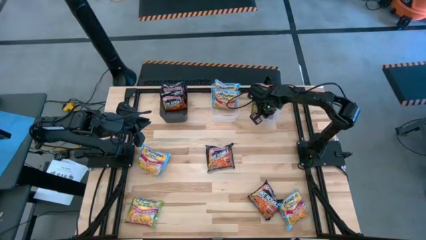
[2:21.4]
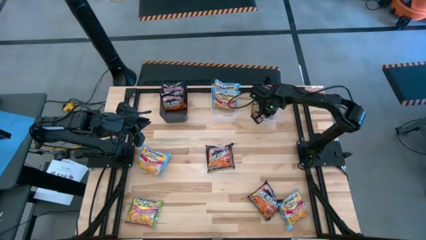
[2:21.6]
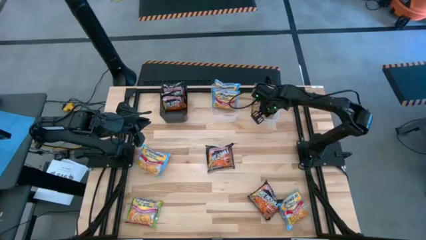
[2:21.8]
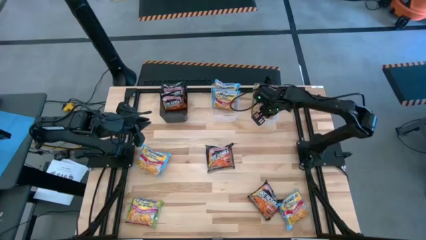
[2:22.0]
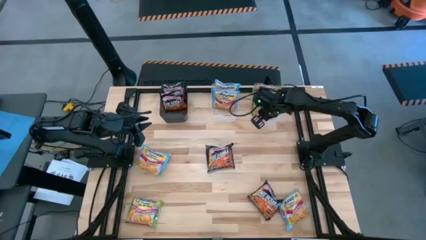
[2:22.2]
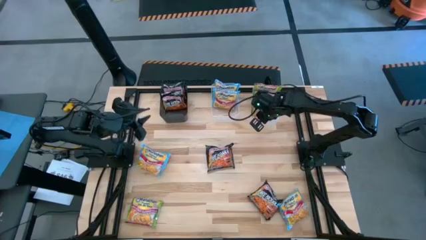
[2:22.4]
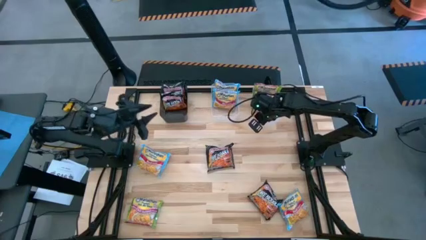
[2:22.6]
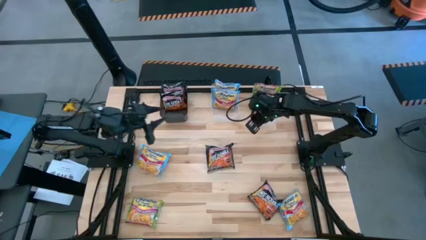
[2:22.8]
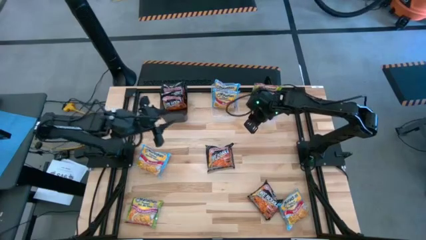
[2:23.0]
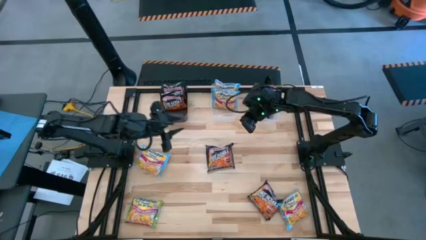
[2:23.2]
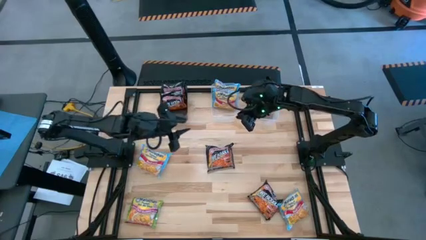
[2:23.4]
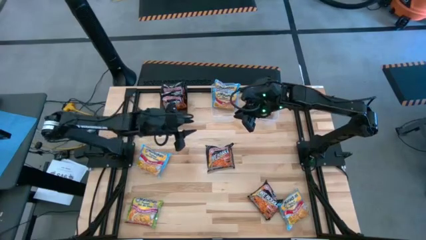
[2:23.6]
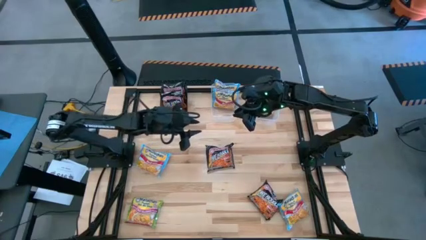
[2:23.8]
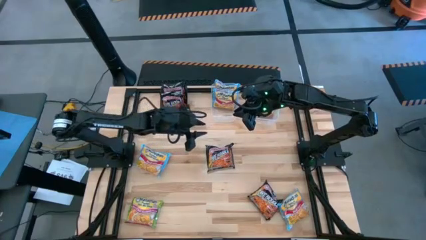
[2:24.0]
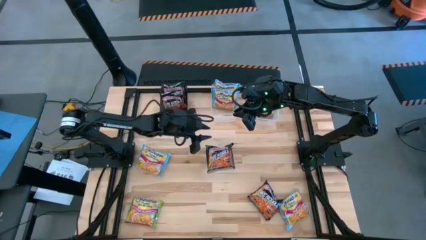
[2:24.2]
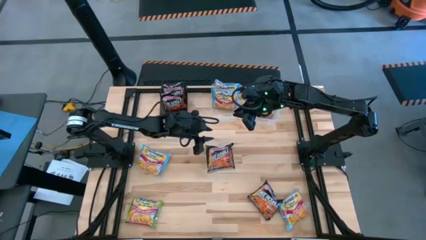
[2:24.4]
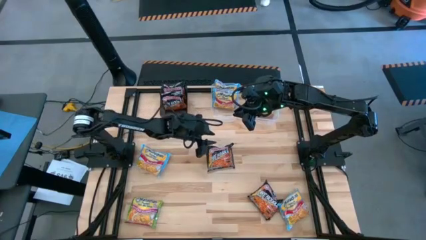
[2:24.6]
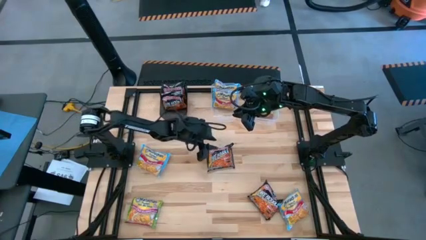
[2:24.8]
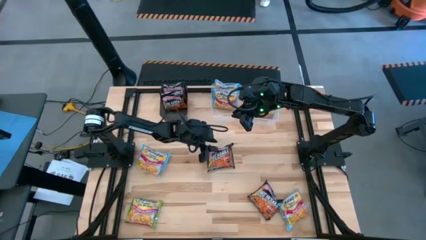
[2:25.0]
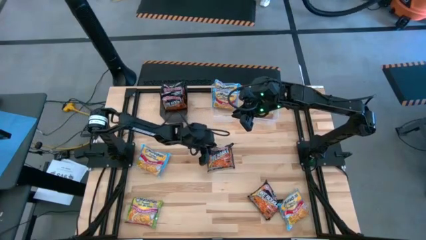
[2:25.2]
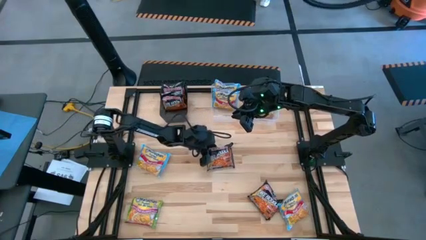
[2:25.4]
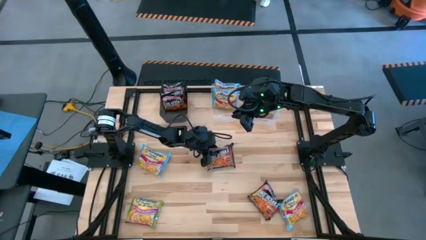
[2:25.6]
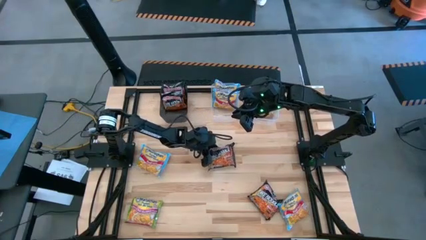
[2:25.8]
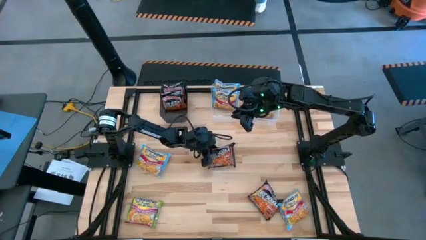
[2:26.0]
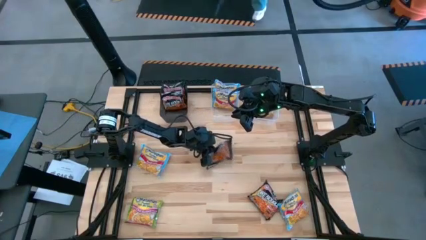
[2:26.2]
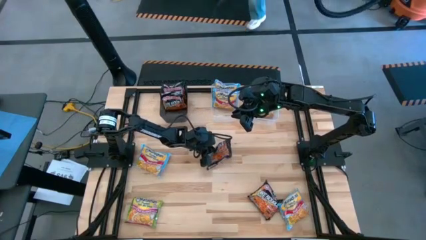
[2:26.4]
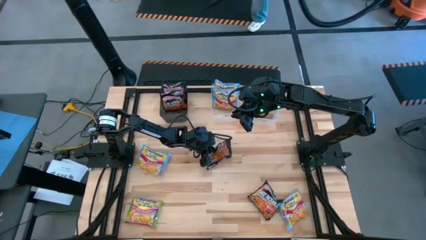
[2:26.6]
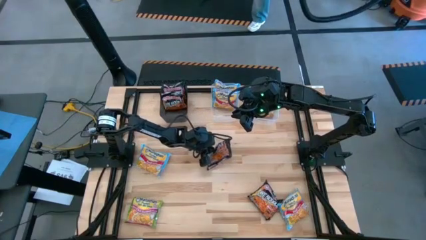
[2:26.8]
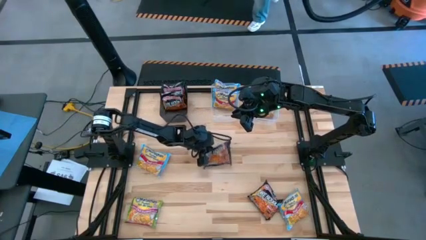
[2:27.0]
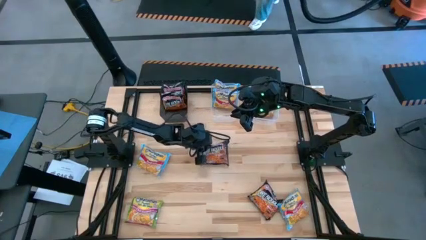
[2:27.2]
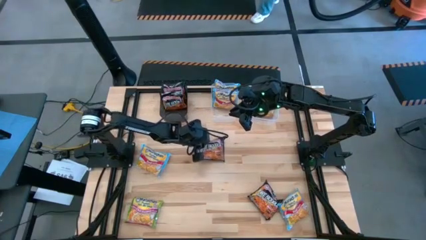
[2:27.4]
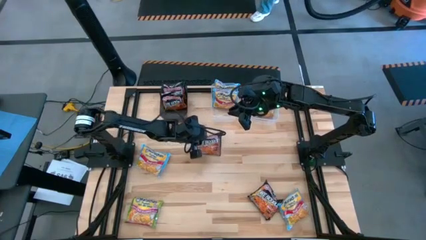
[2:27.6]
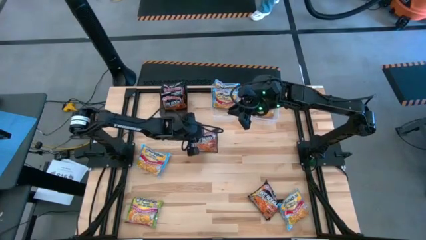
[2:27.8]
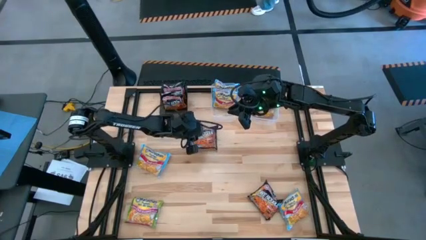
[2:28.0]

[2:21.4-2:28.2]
Task: Sort Maruchan noodles
Put the top black noodle pack into the black bin

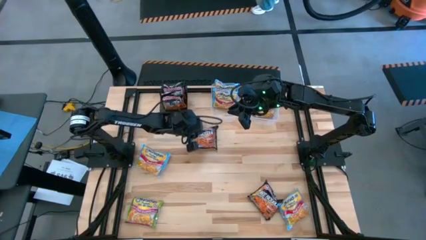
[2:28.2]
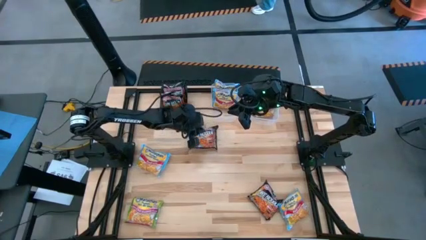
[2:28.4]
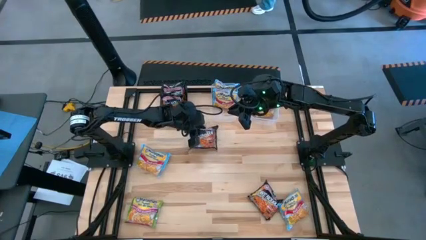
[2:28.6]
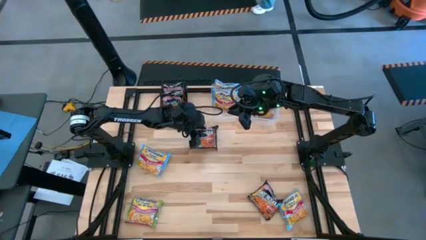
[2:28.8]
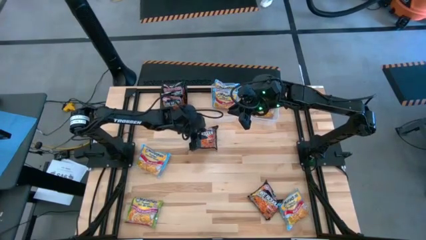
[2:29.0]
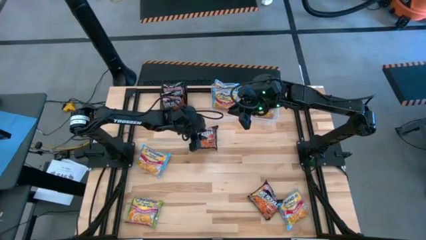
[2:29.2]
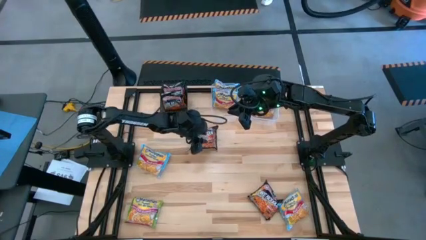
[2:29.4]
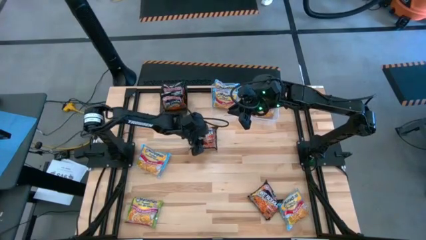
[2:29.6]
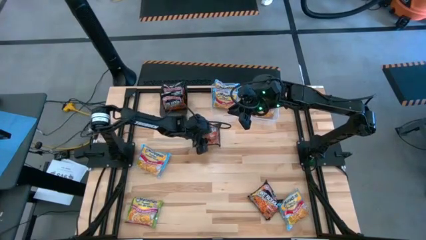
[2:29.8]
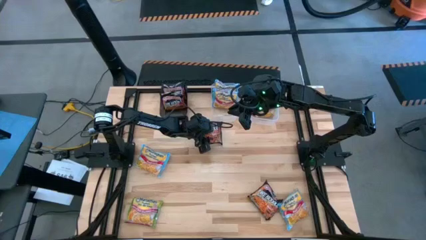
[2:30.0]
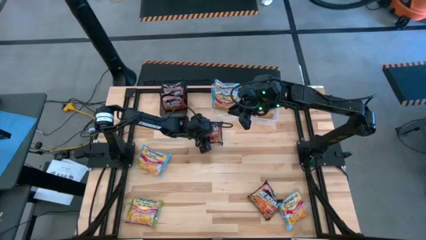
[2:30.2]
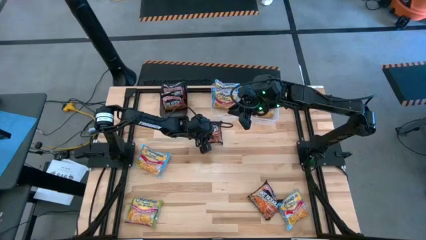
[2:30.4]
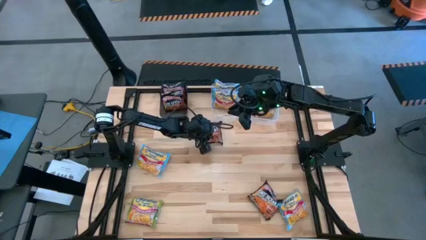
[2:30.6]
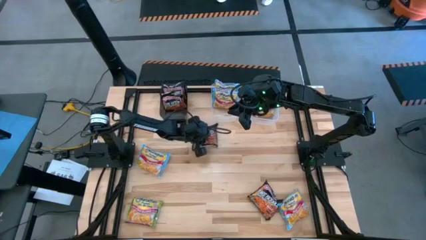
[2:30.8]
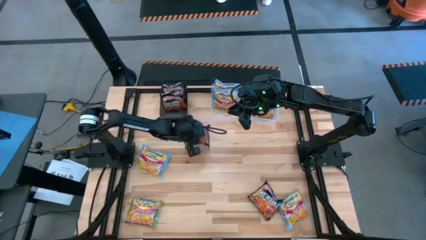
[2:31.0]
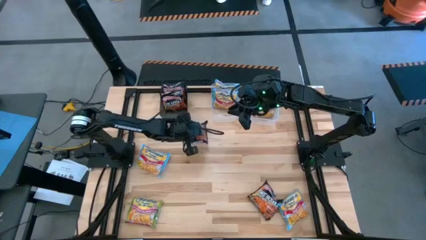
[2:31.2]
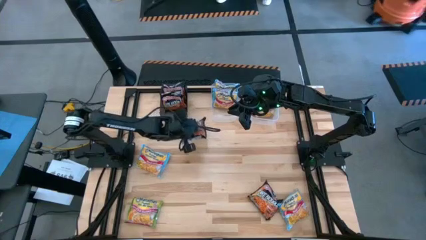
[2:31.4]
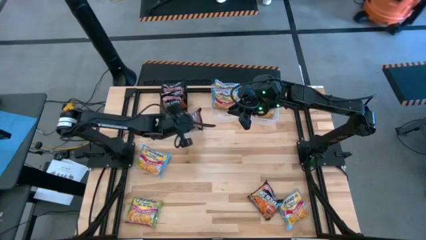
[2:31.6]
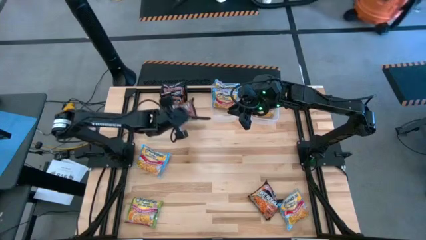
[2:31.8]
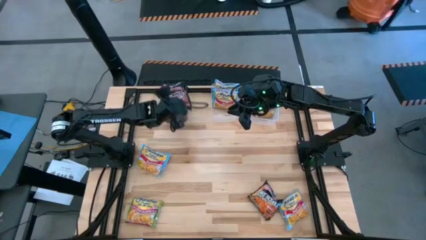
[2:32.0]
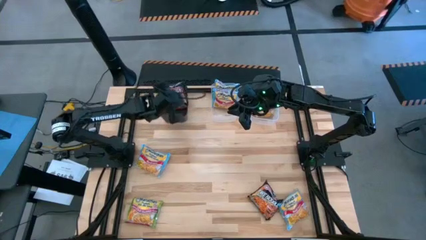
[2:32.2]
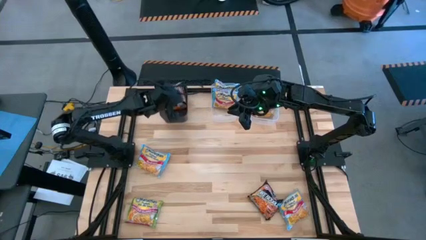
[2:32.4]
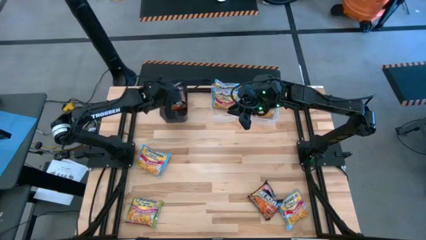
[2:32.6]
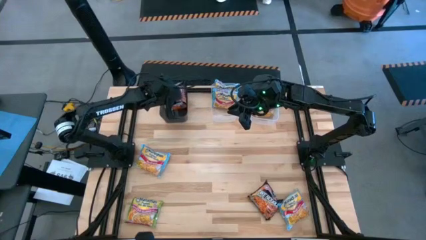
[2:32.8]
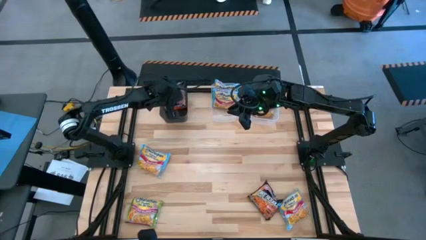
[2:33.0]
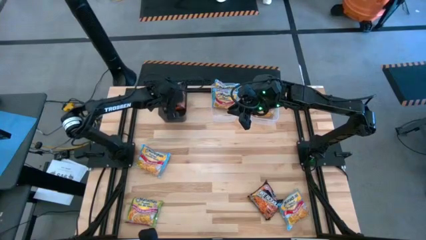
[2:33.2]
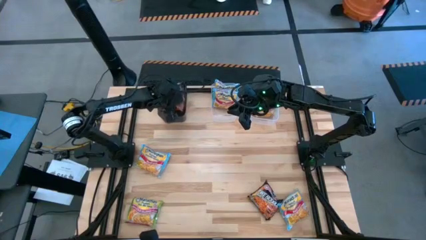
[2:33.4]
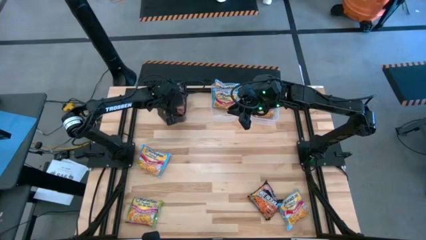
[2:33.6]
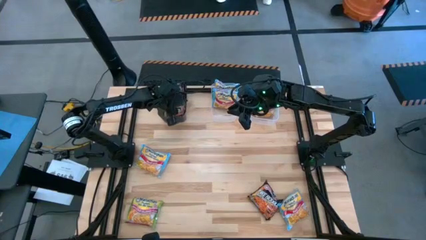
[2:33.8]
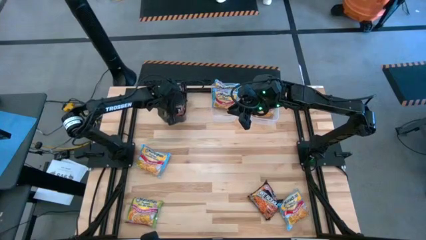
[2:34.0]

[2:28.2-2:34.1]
Put the top black noodle pack into the black bin

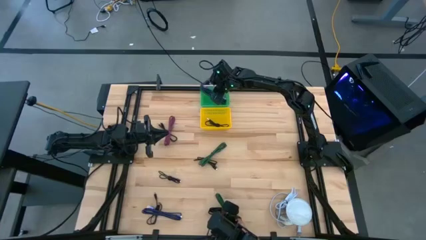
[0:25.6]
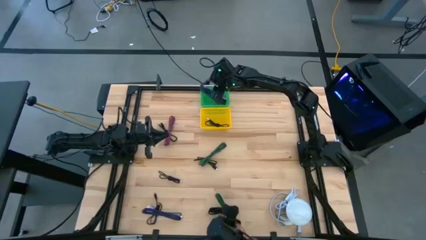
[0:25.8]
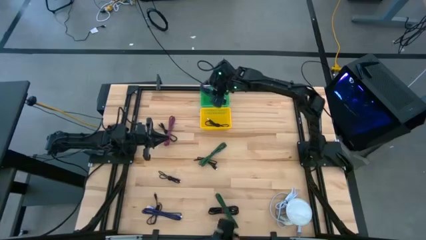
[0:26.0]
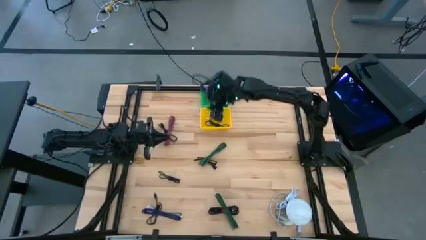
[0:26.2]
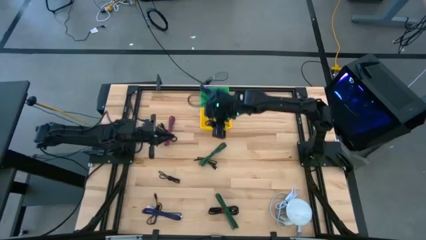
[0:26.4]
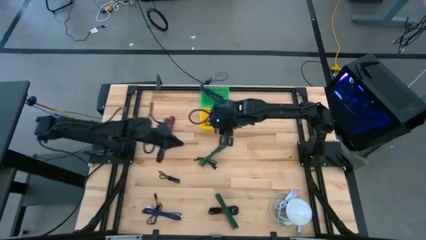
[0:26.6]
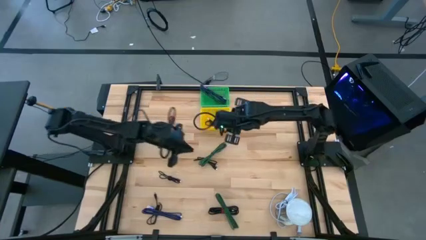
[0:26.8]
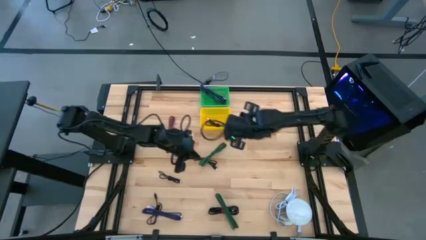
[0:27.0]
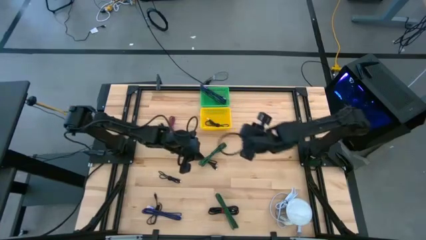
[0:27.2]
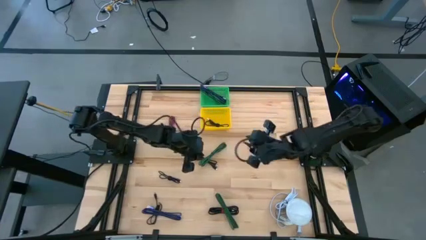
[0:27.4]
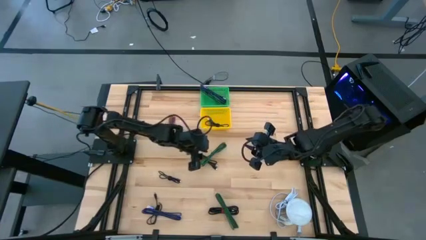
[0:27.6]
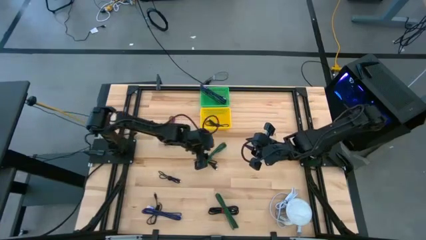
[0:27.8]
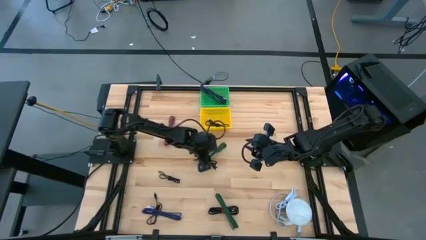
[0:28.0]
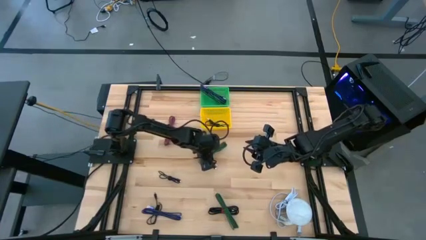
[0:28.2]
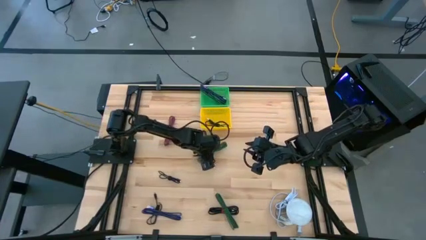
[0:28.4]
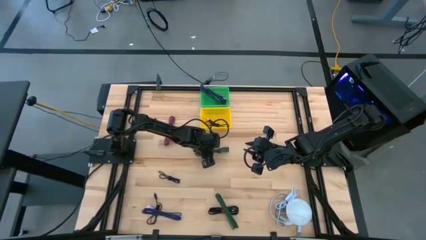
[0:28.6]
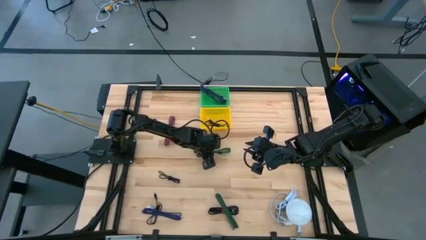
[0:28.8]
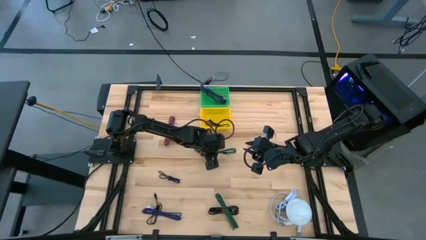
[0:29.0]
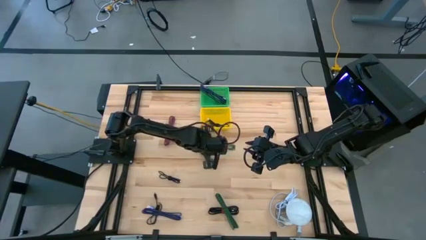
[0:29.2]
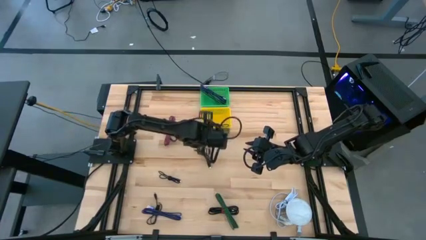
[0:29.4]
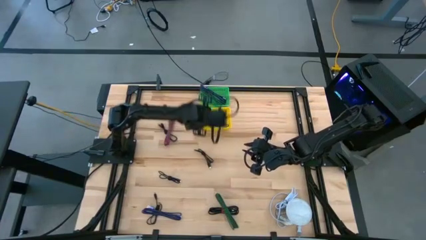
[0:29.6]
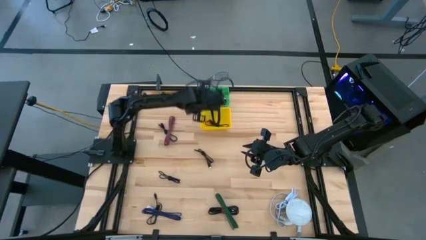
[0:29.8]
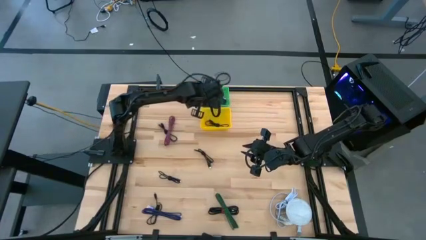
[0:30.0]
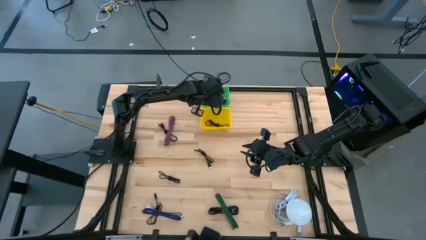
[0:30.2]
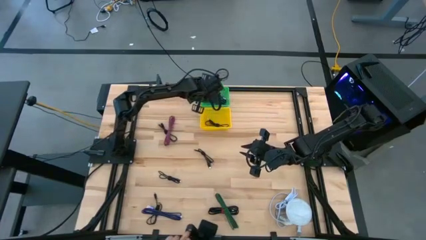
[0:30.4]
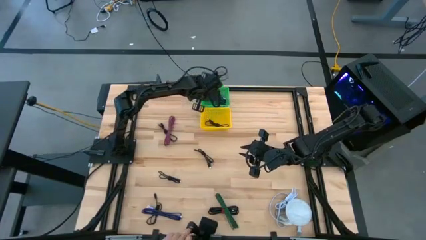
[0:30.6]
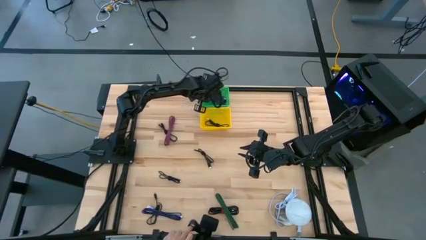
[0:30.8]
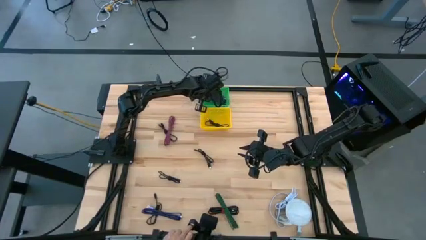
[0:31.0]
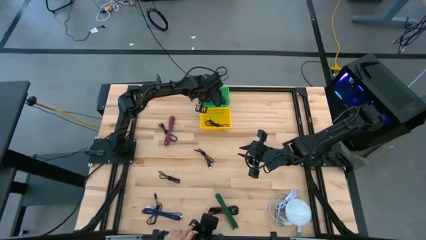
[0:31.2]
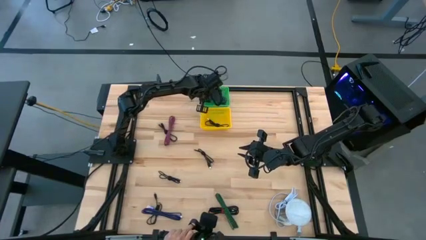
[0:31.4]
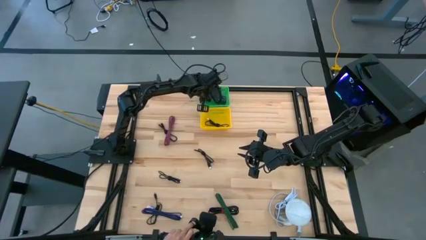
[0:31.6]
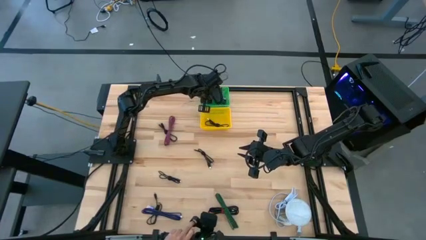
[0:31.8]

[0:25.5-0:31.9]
Task: Pick & Place USB Port
Put the middle green charger cable into the green basket
